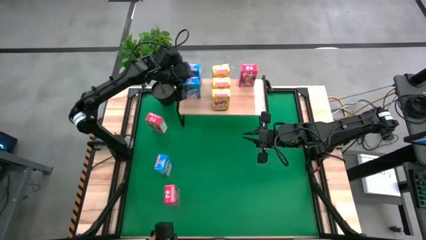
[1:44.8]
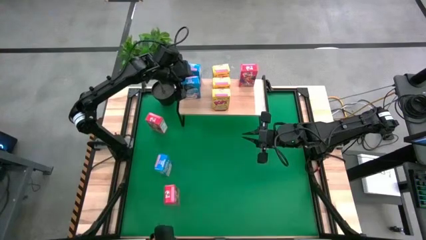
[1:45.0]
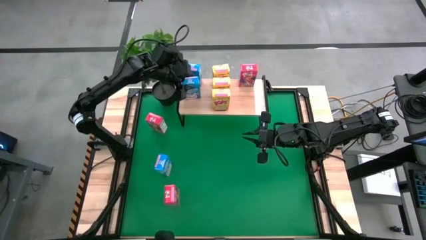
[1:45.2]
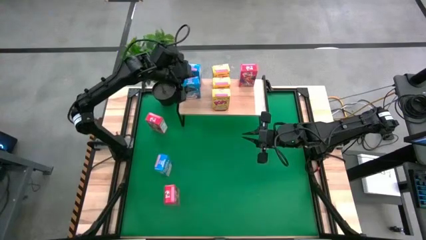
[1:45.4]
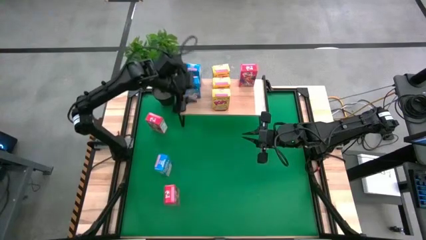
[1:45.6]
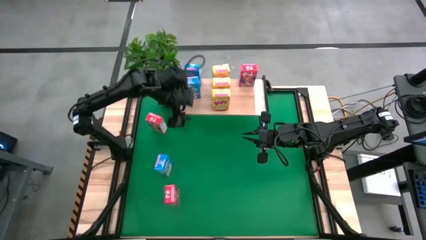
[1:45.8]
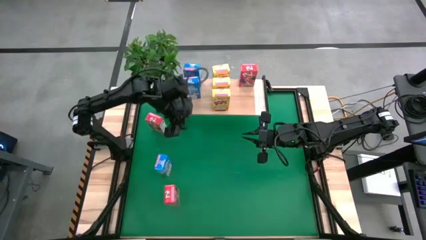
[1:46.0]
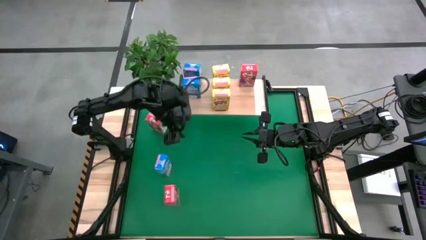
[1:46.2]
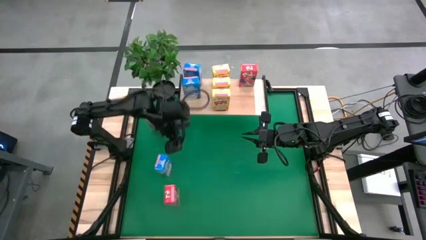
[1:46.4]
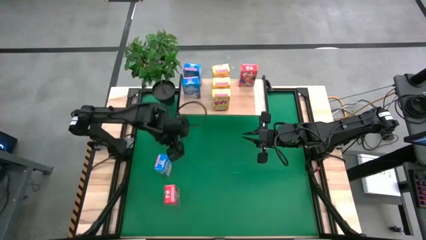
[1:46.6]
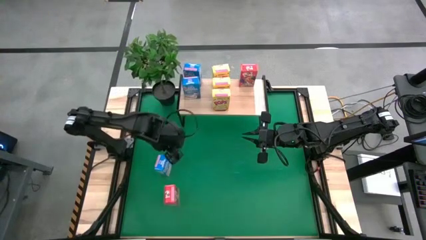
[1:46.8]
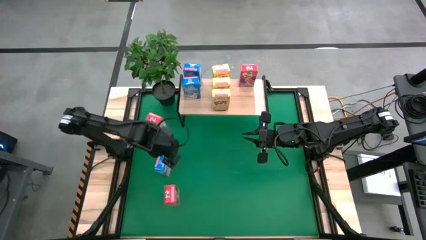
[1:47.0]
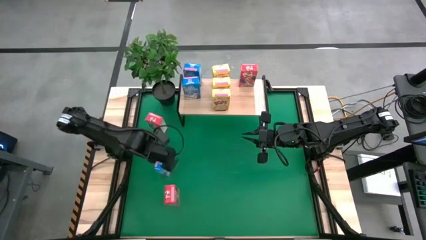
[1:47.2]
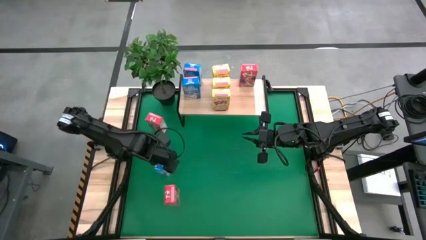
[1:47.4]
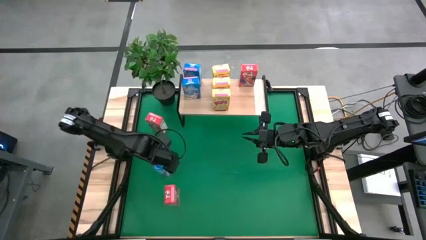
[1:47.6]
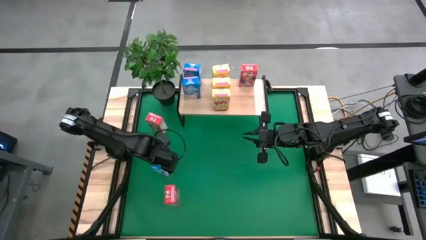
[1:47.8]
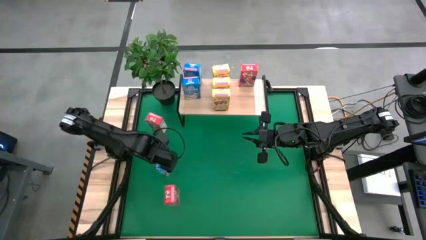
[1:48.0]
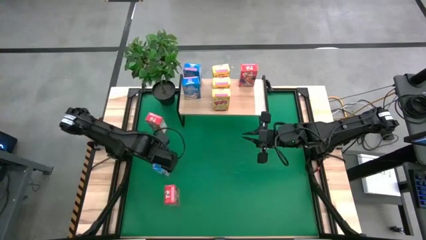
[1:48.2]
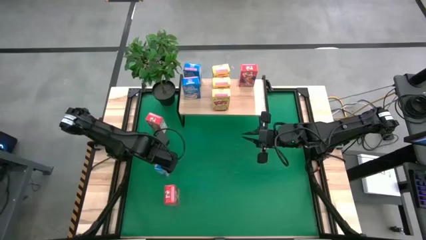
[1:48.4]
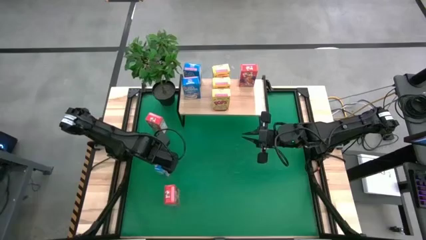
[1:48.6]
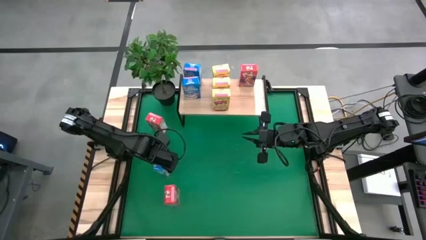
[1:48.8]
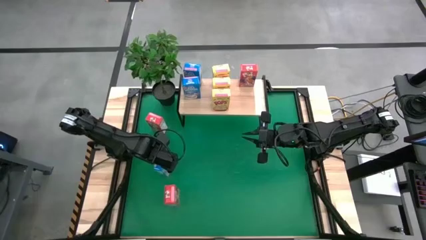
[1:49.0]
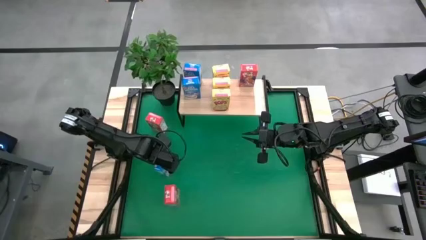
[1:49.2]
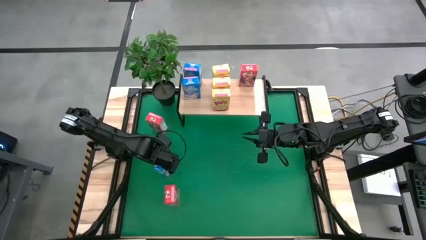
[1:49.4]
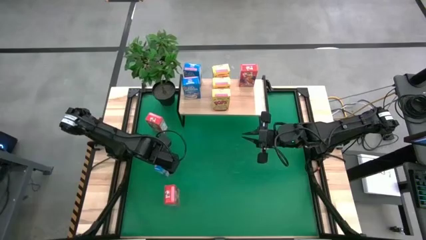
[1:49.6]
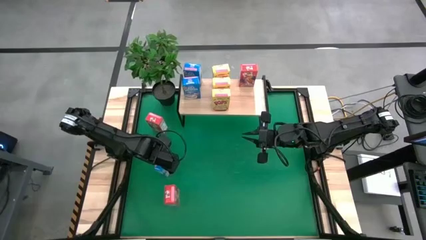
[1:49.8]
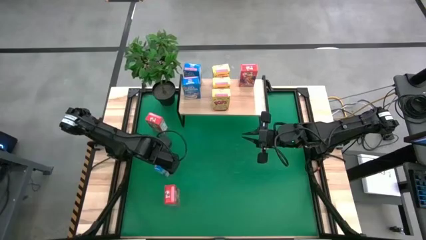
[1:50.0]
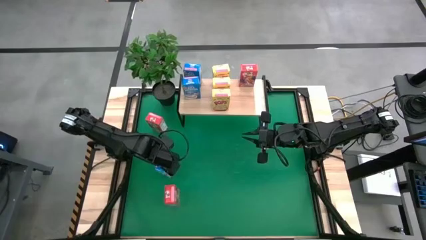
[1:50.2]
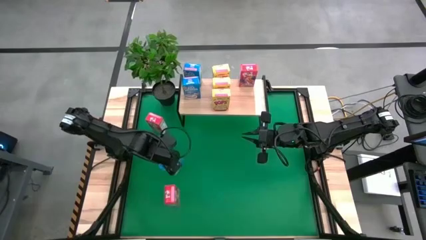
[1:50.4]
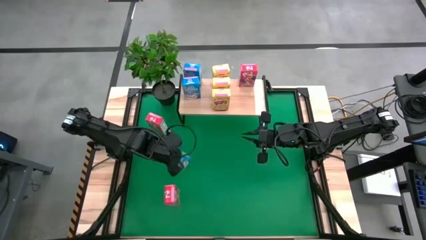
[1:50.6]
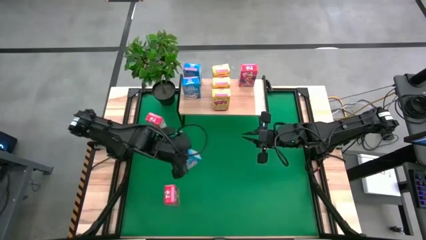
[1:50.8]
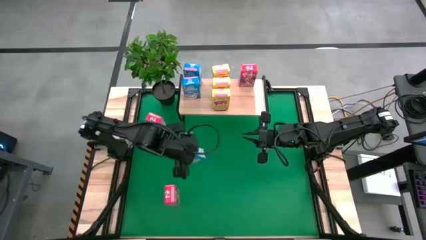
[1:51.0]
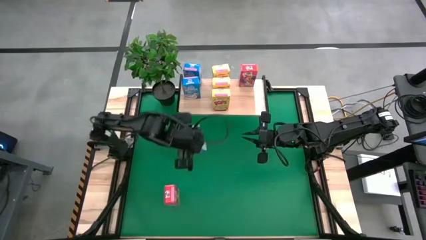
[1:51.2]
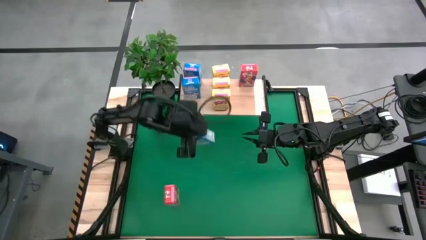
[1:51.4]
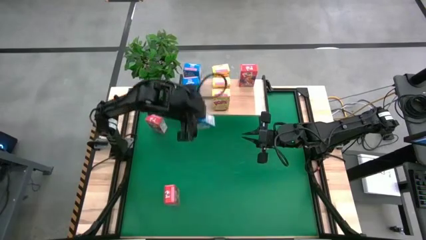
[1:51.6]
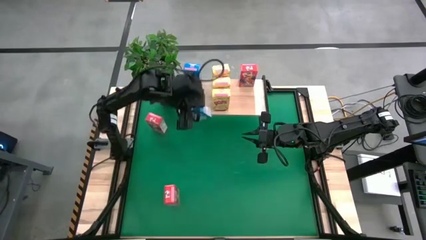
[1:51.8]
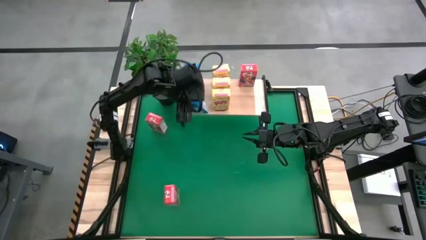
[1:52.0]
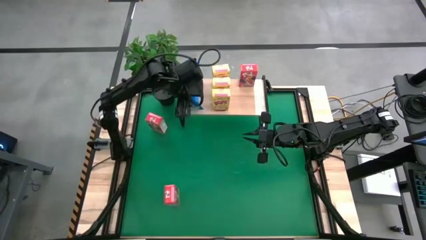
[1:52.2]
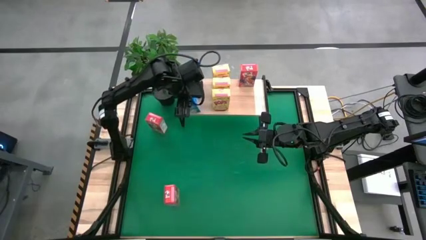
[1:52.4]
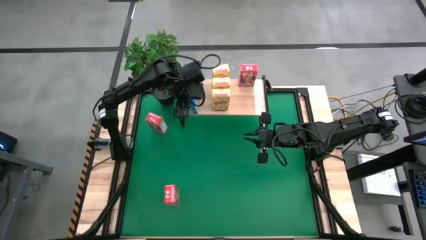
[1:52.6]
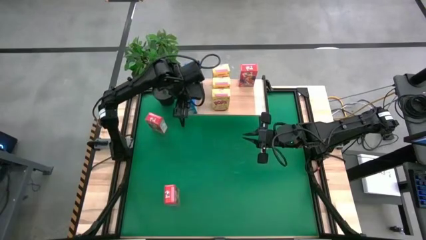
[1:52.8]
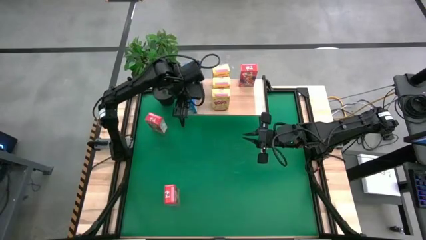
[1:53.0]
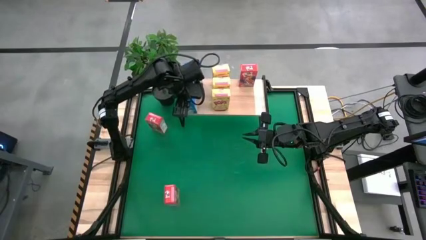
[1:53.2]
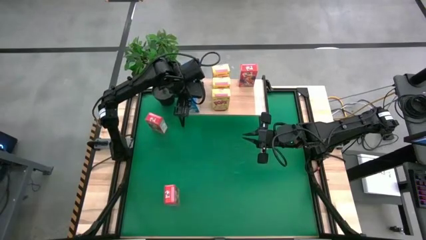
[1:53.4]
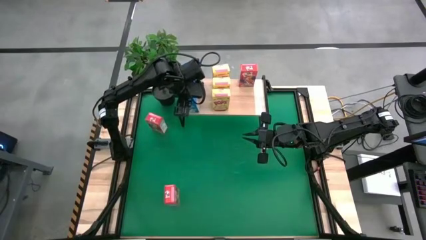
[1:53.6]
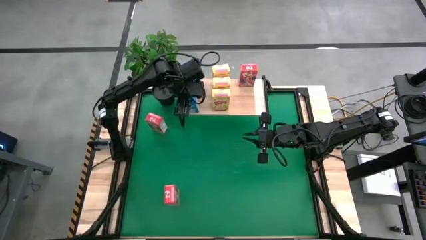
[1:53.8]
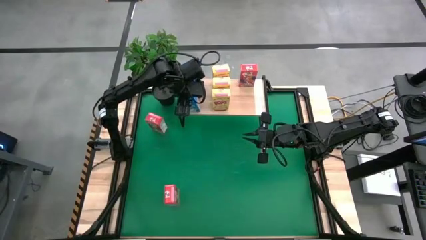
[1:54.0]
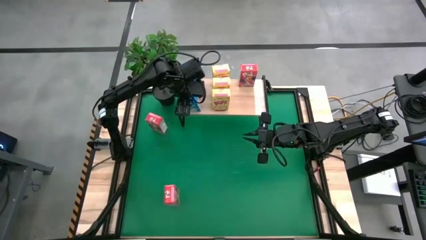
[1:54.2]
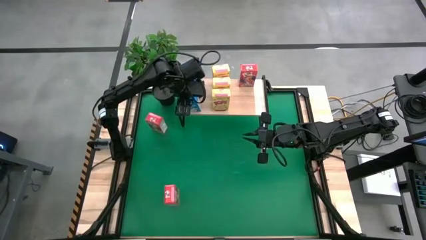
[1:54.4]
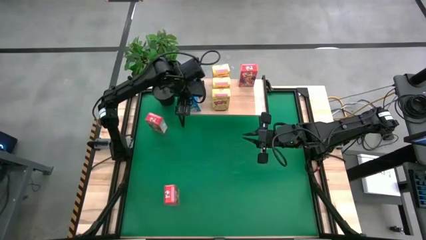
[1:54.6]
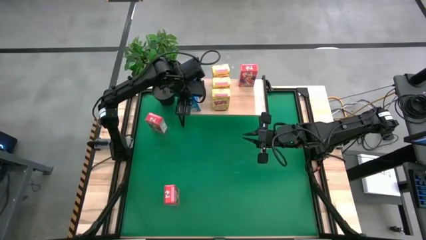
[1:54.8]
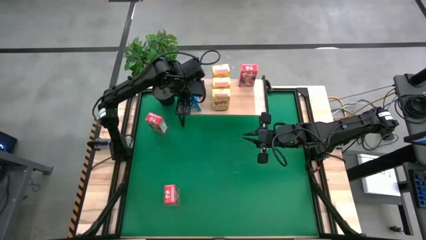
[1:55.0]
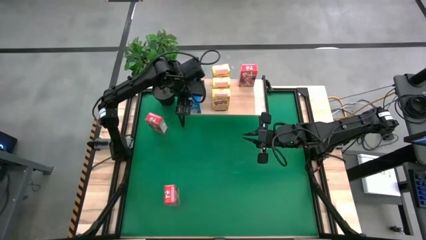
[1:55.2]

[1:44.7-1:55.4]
Task: Stack cereal on shelf
Put the blue cereal box on the shelf

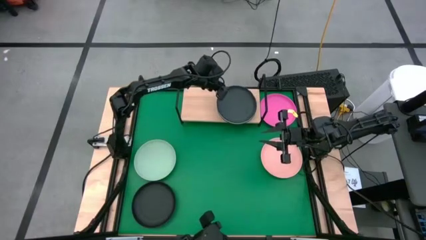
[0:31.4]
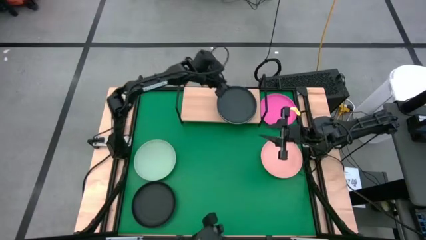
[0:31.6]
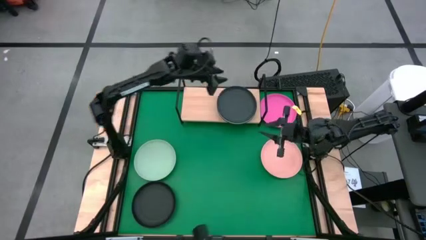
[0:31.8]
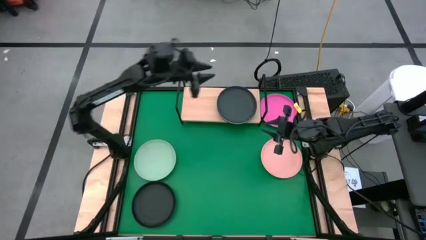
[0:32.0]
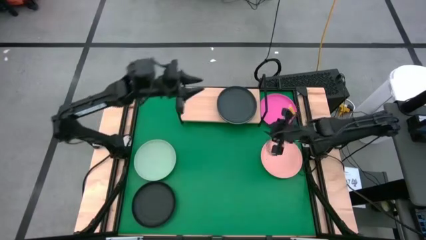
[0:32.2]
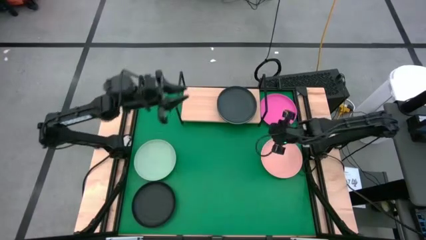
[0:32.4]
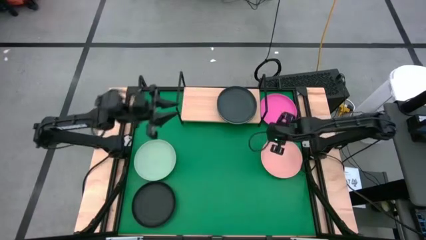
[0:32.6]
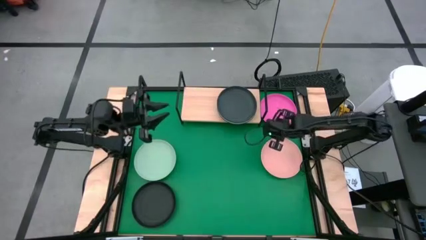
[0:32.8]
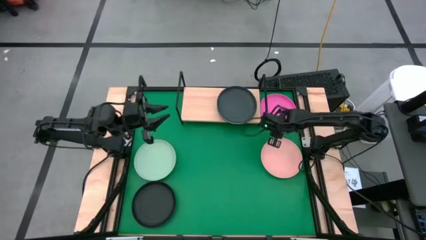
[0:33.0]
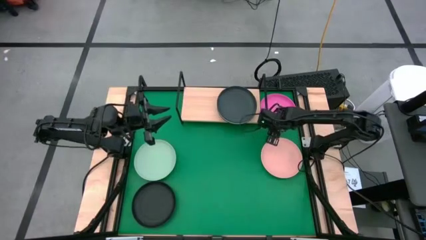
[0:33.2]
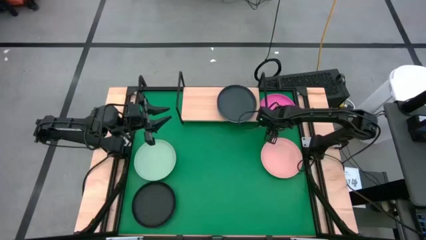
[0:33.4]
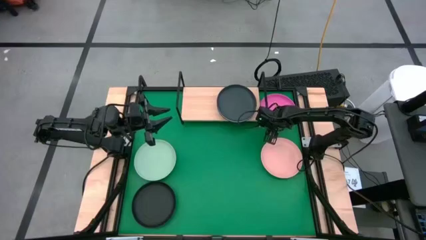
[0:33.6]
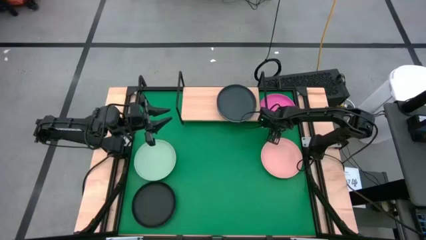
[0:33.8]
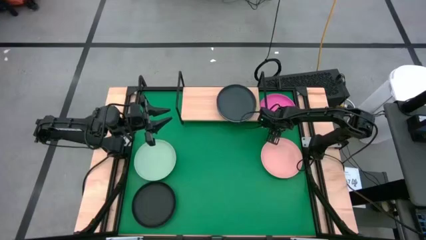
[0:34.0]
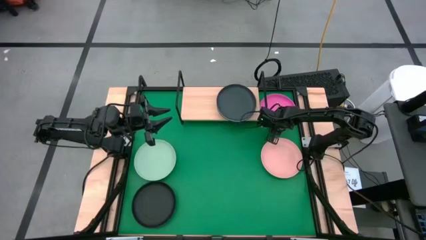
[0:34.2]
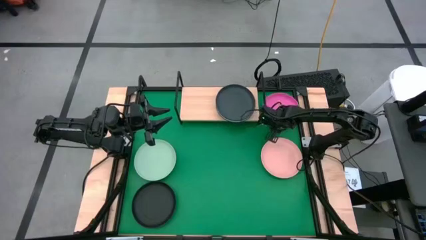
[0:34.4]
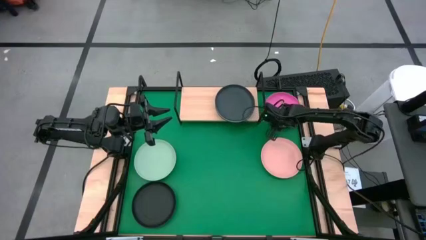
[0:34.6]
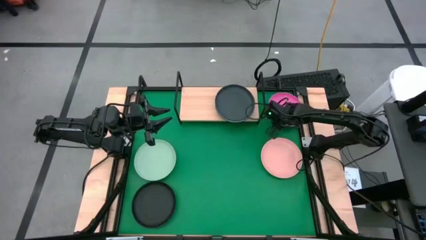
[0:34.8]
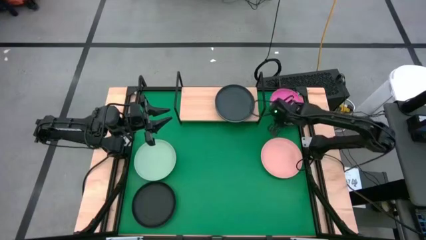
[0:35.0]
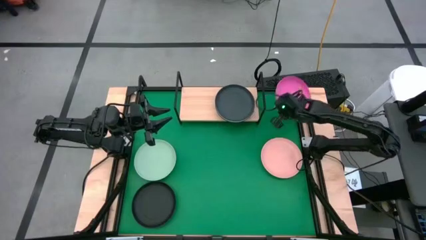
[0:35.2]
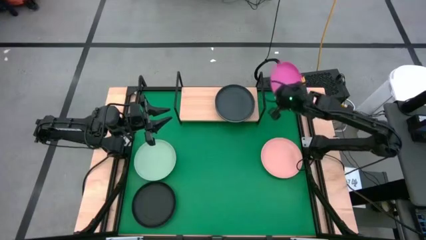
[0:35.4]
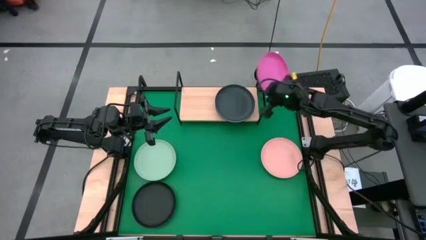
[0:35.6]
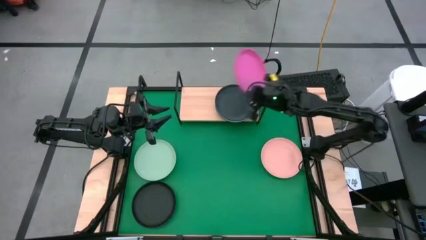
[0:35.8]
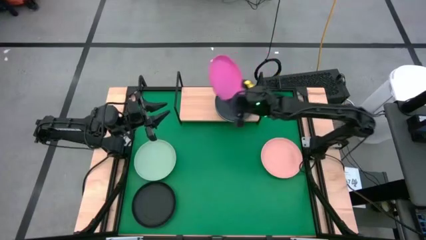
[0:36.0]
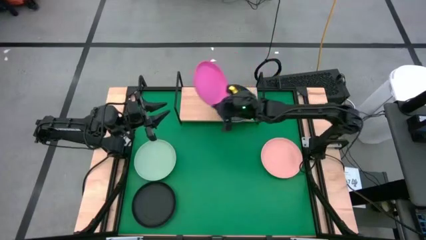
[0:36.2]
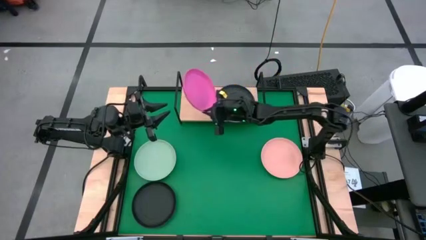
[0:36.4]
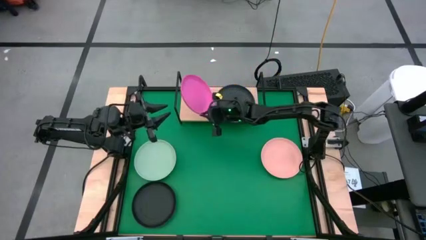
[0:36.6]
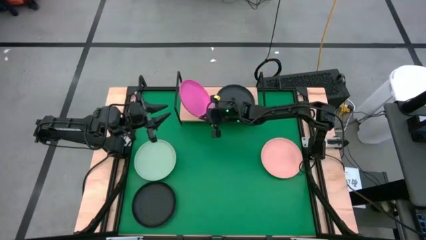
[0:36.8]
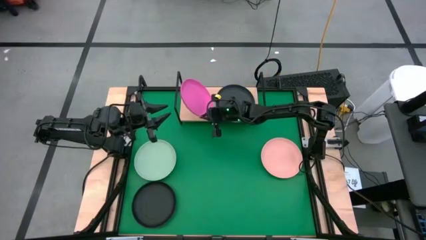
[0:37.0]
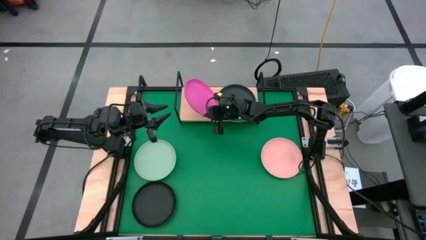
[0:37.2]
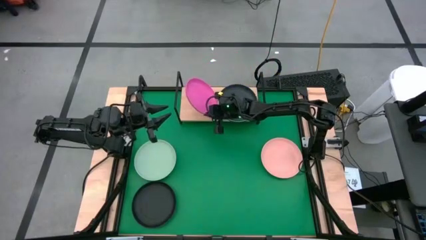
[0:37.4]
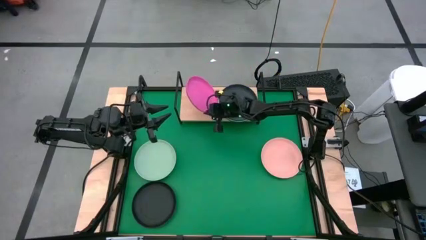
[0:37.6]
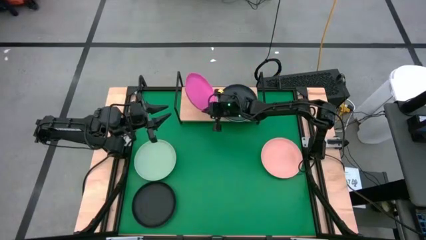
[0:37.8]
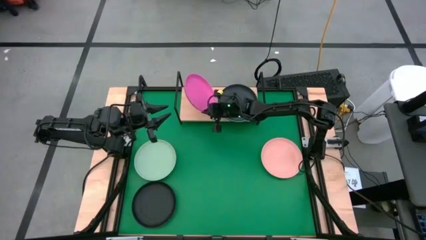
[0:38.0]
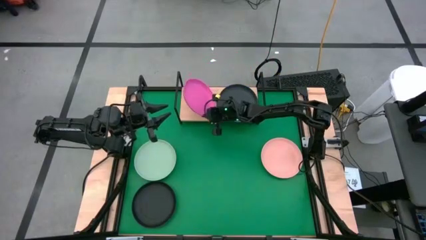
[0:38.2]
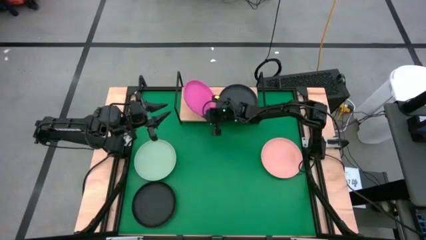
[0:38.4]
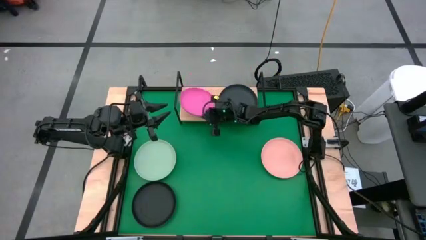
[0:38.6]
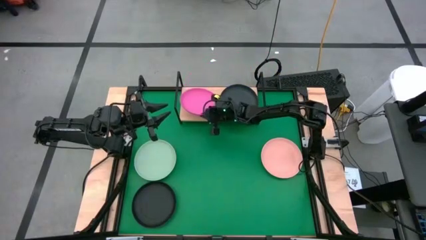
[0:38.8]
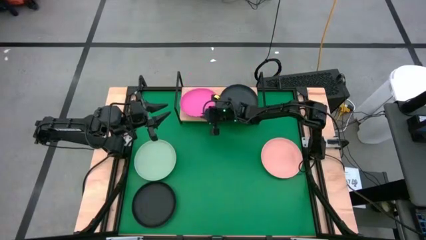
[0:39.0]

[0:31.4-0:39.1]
Task: Place and stack plates onto a shelf
Put the pink plate on the shelf
